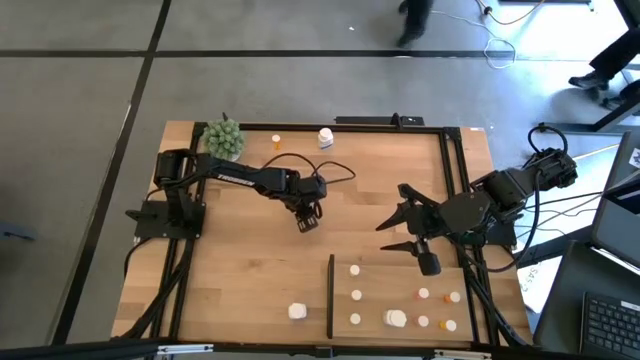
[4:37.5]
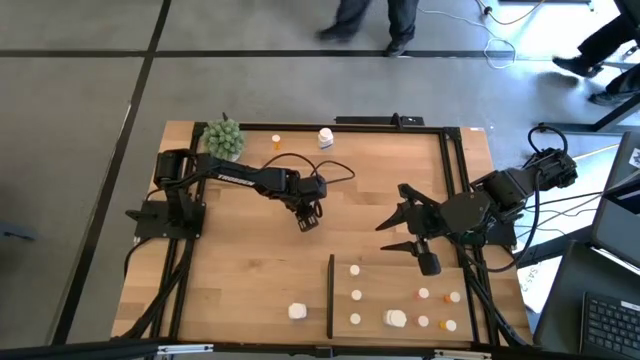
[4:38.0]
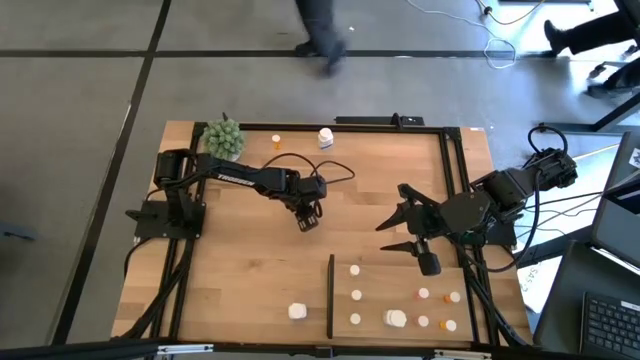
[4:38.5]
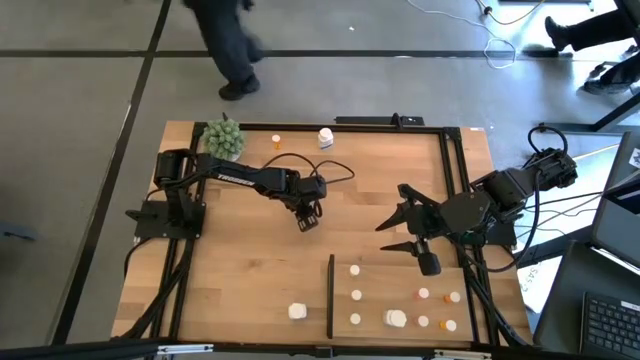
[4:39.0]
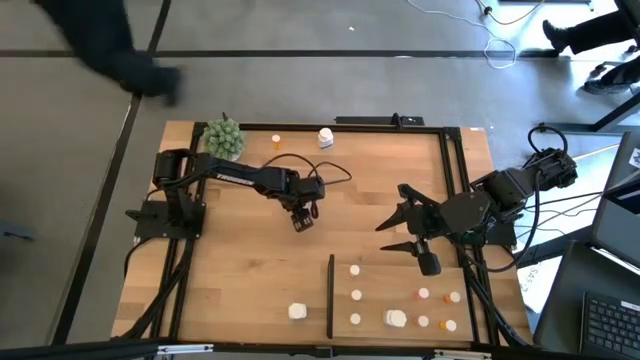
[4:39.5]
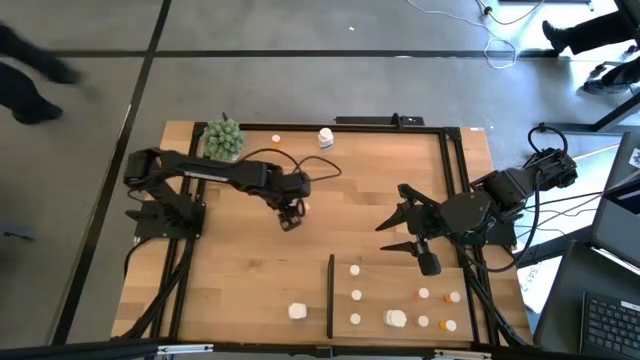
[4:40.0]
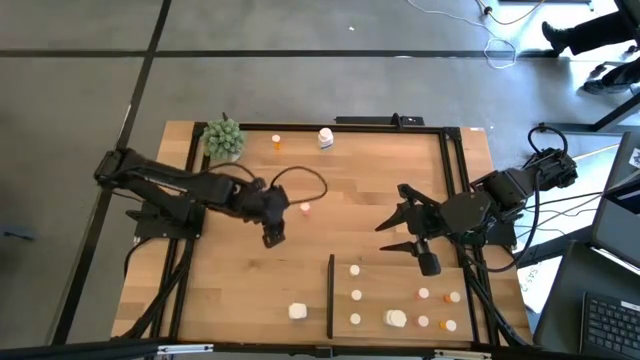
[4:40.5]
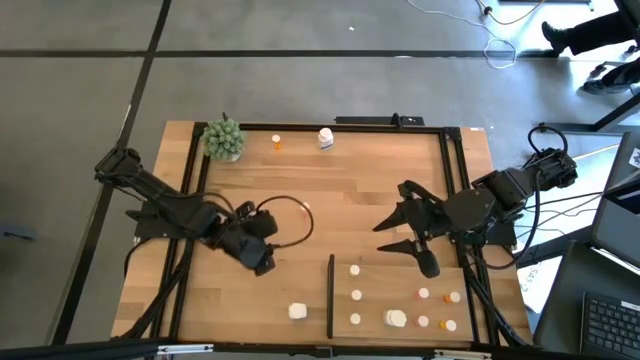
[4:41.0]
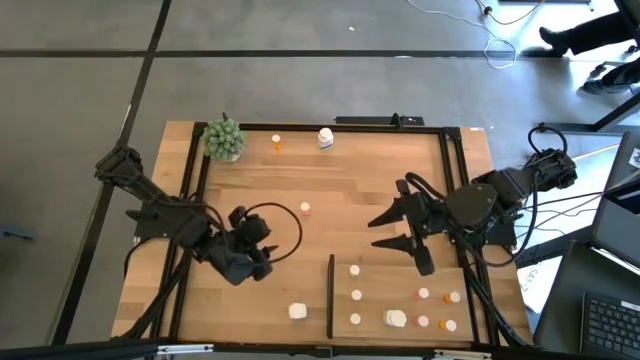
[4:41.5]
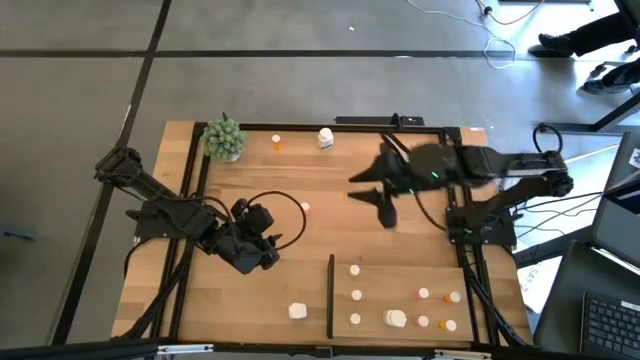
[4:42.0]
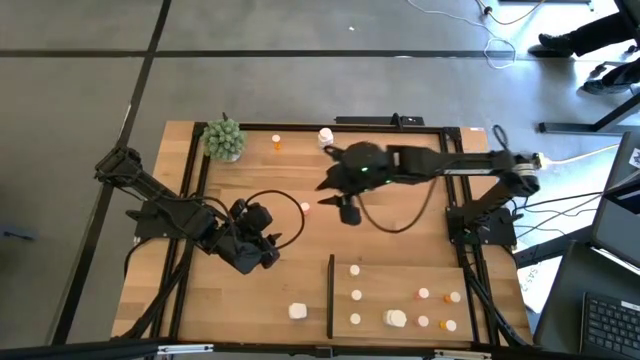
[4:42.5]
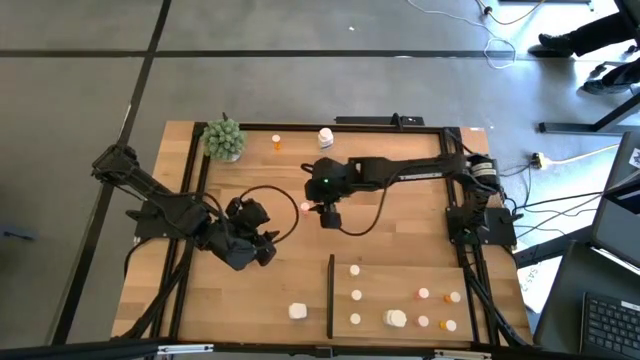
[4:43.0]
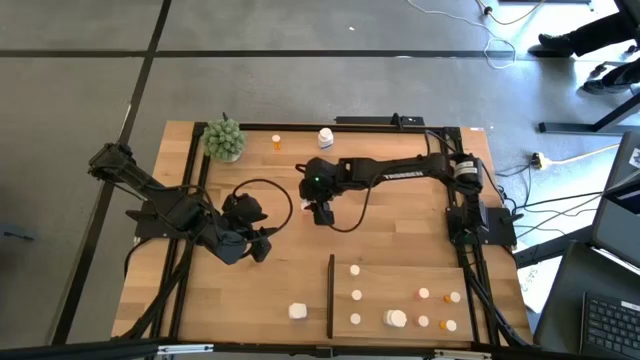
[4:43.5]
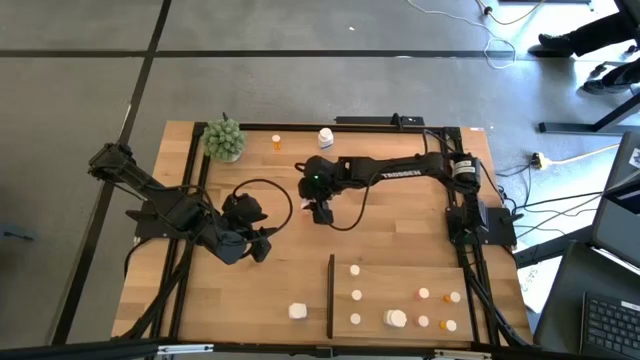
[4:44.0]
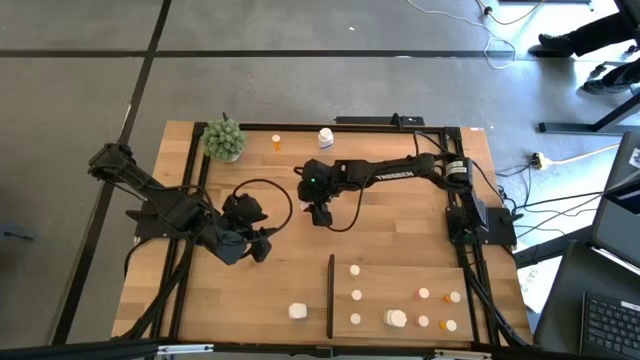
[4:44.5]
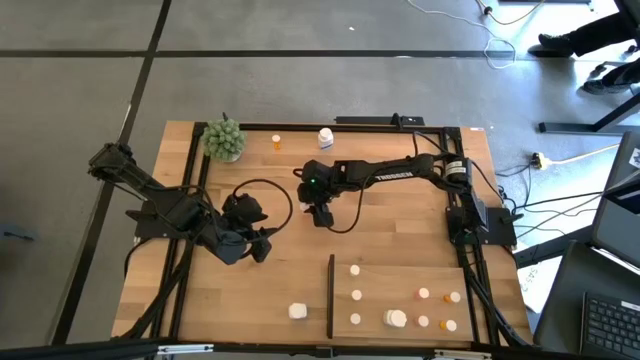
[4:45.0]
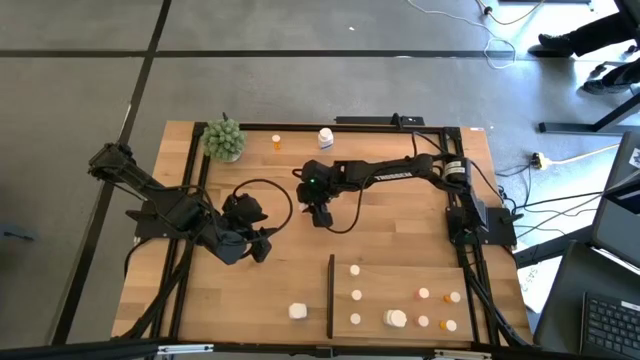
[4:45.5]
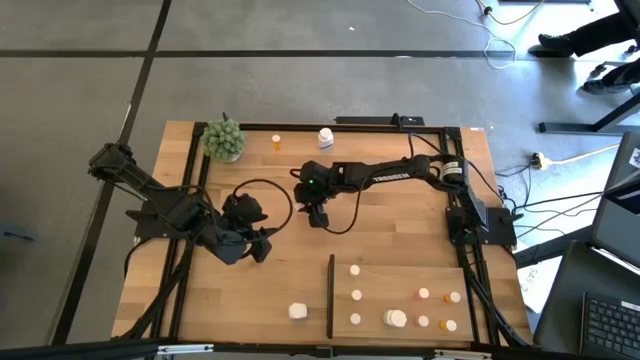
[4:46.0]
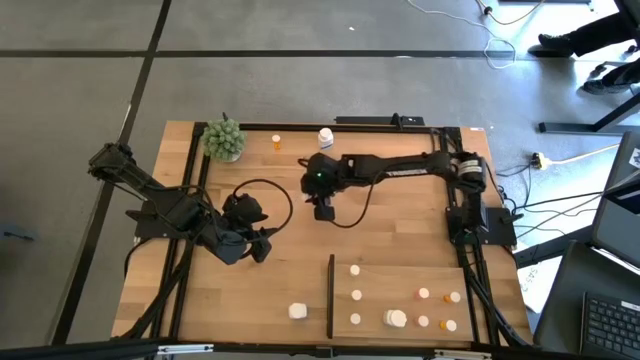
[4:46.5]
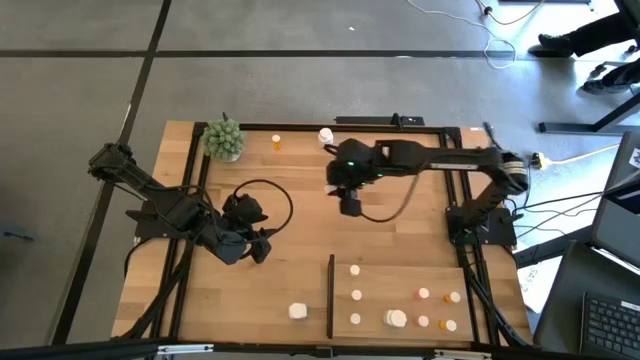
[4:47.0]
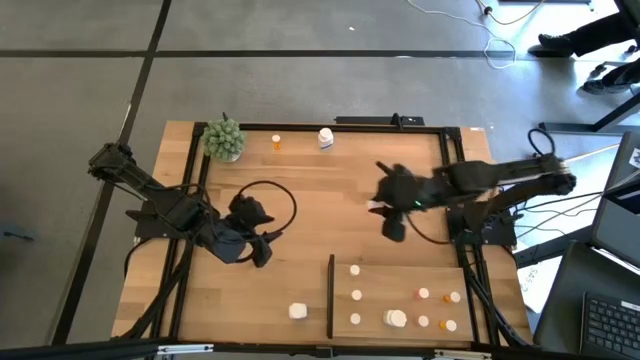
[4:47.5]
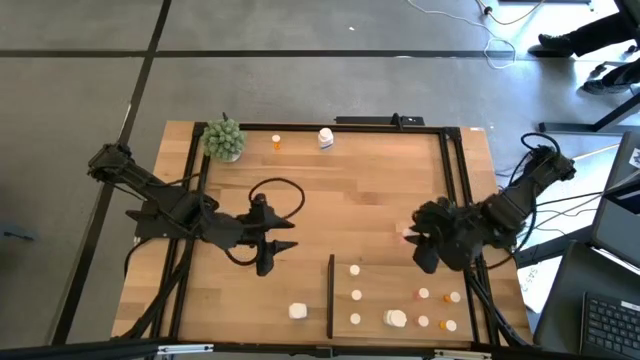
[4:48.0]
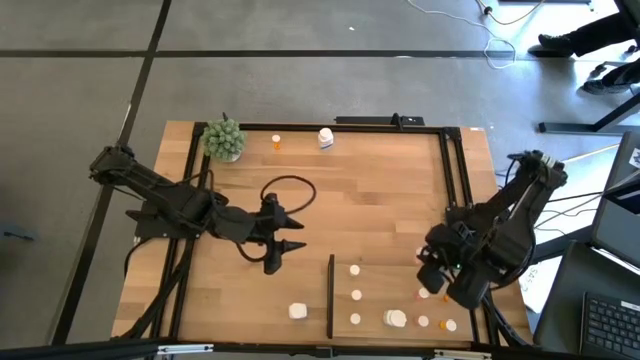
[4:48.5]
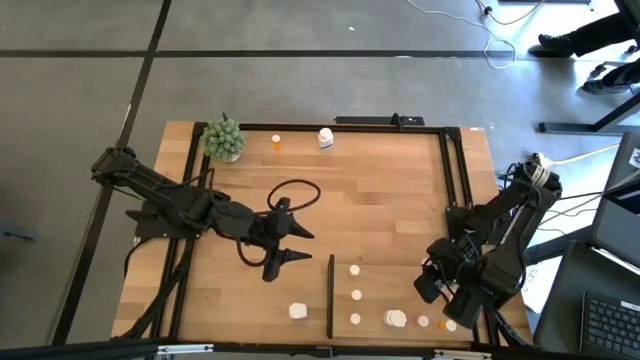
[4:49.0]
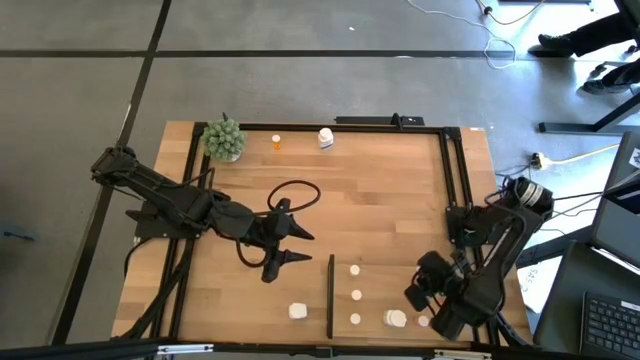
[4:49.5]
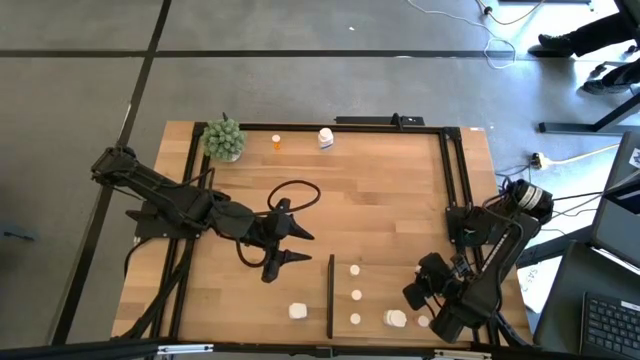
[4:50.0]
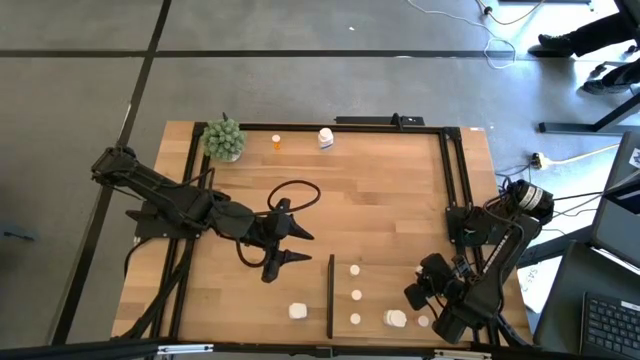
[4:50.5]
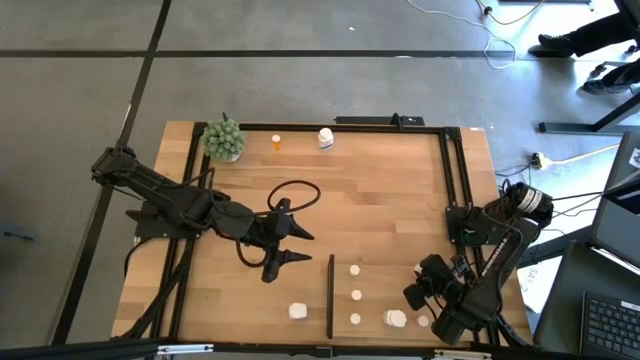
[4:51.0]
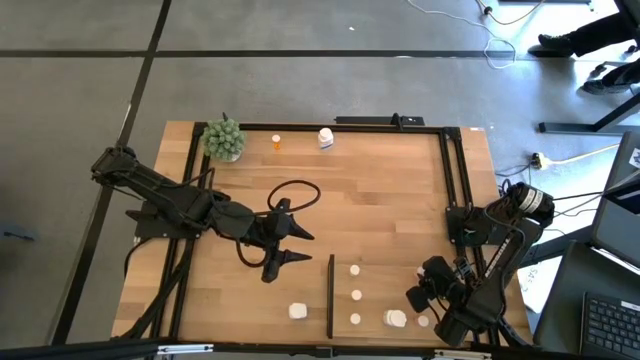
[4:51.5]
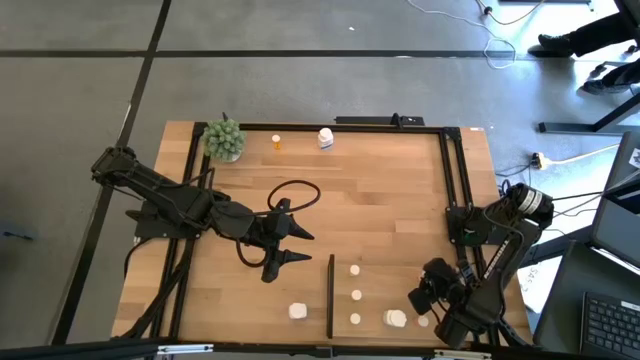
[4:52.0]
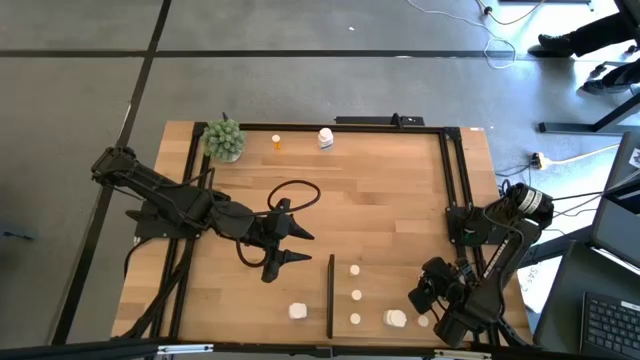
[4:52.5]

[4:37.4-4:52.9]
Task: Pick and place medicine bottles onto shelf by color
Put the pink pill bottle on the shelf aligned with the other pink pill bottles

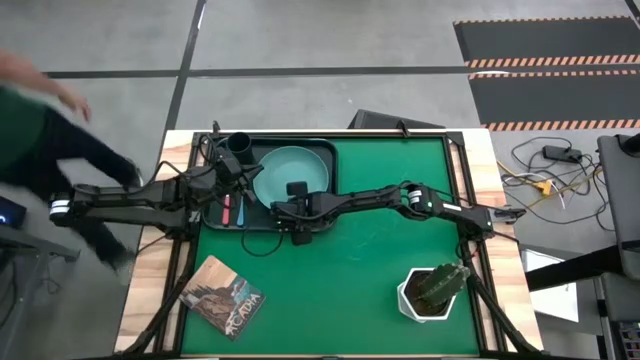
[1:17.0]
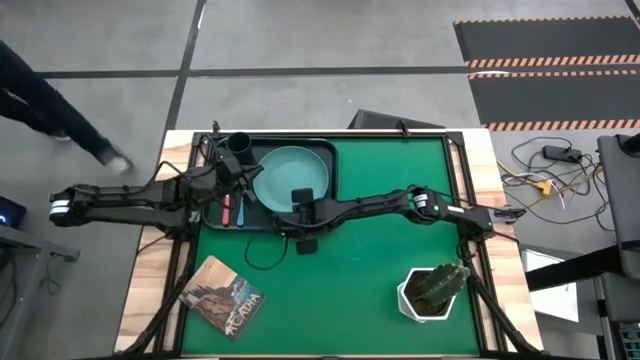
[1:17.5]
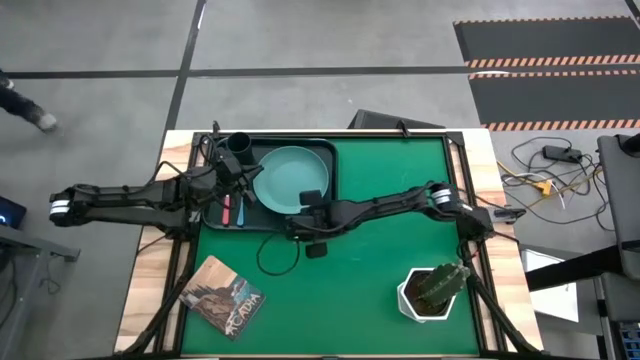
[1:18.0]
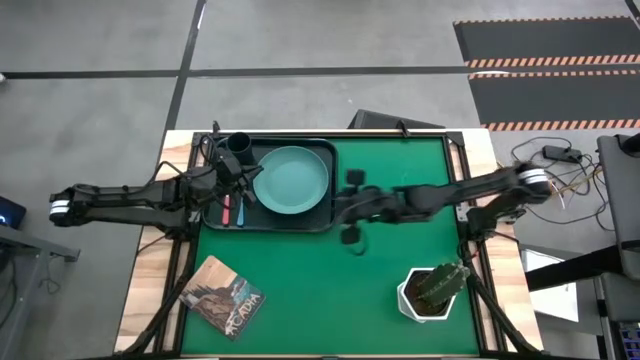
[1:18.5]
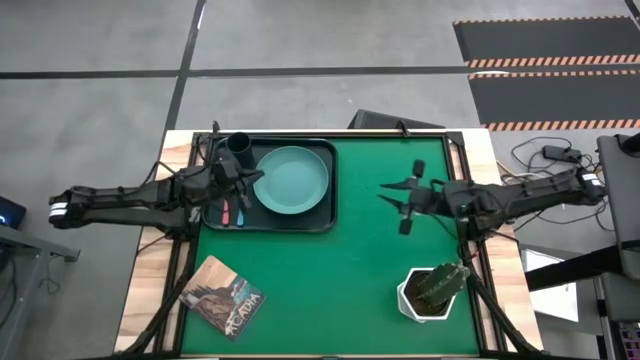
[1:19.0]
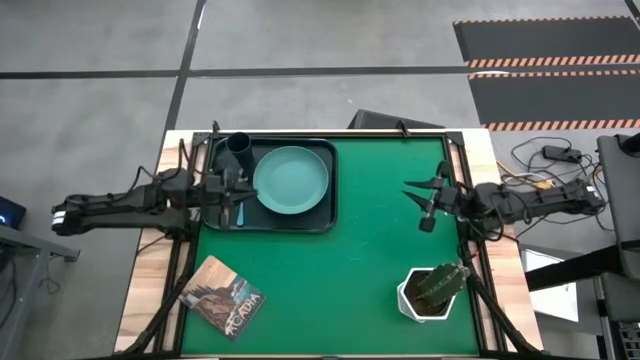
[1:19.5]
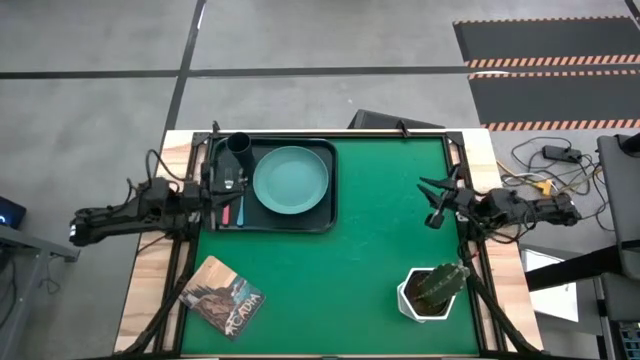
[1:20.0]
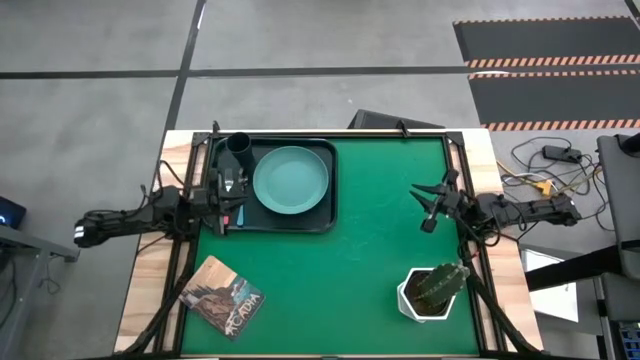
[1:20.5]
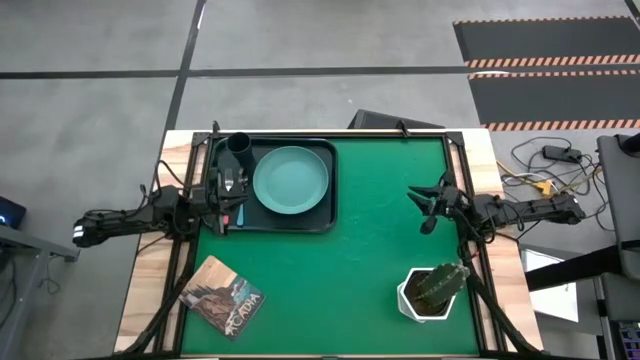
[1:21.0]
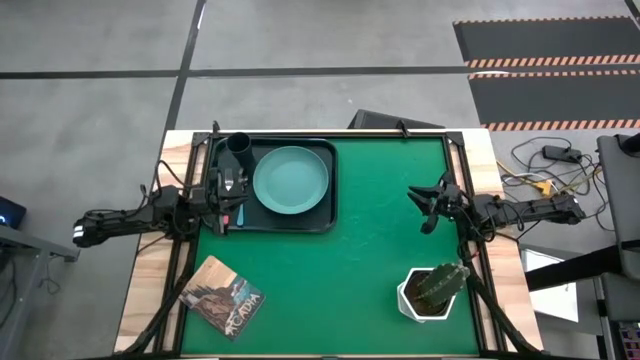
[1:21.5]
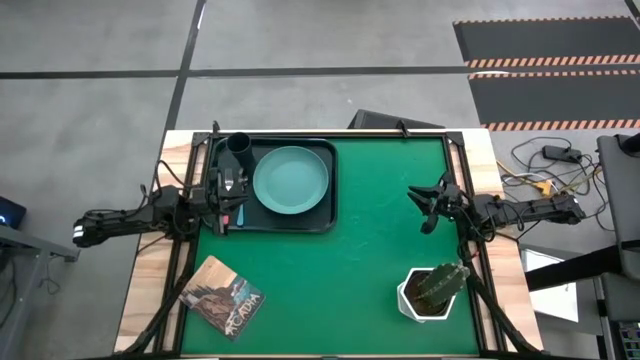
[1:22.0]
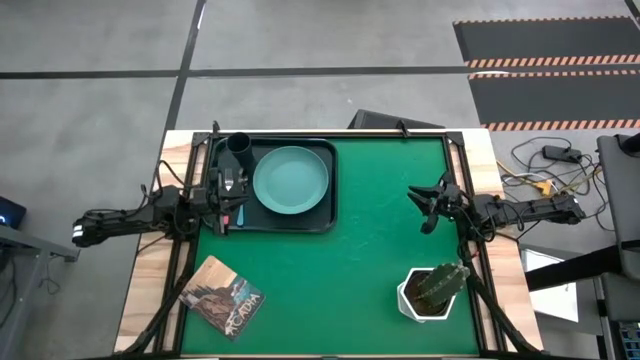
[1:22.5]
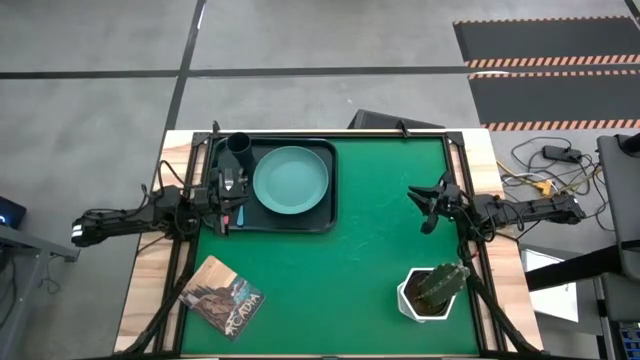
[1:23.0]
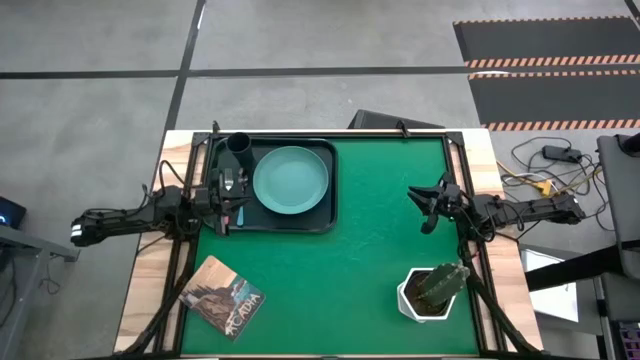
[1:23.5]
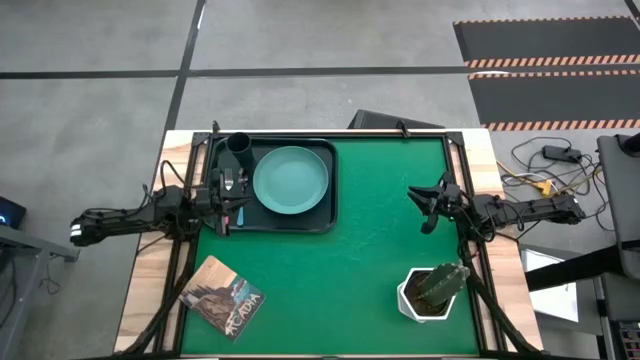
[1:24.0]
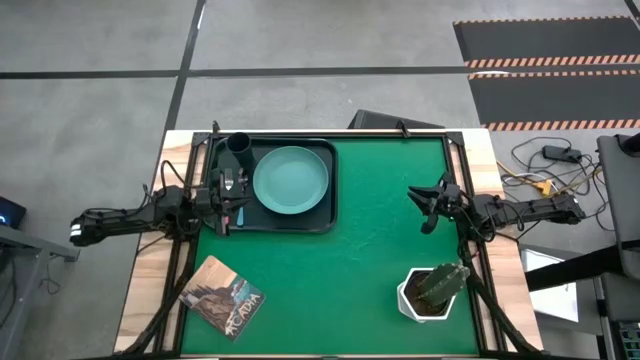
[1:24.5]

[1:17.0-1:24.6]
Task: Pick and place plate/cup/fork/spoon on tray
Return to Home Position
